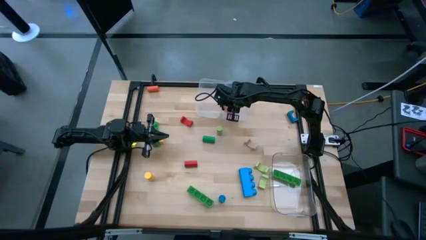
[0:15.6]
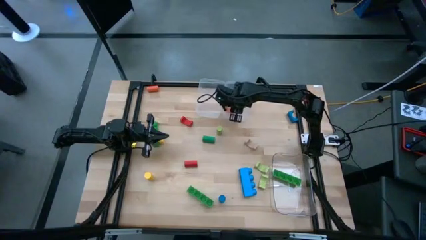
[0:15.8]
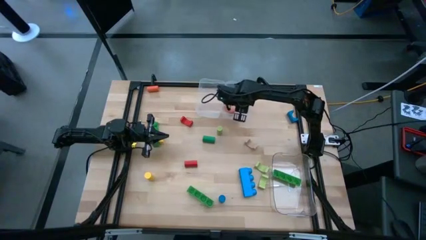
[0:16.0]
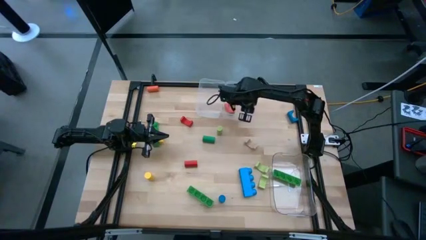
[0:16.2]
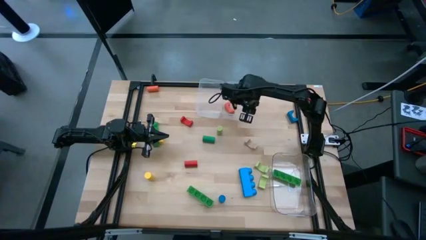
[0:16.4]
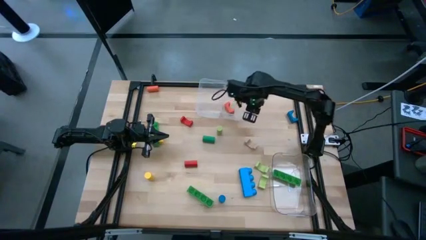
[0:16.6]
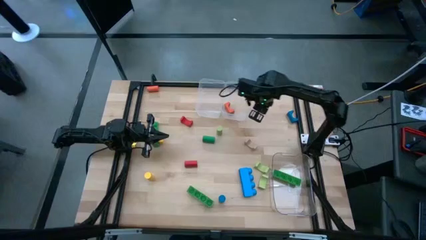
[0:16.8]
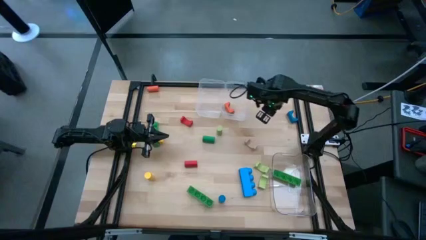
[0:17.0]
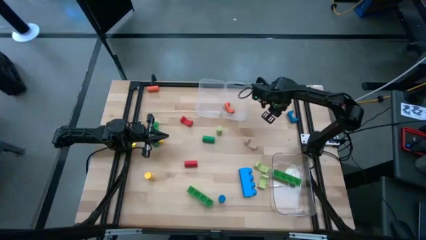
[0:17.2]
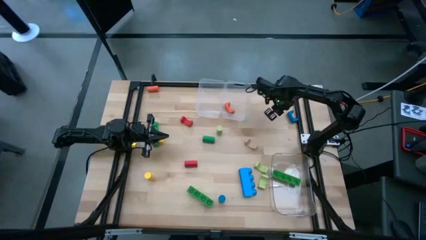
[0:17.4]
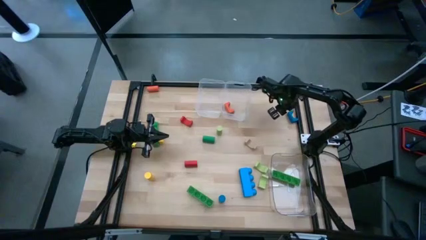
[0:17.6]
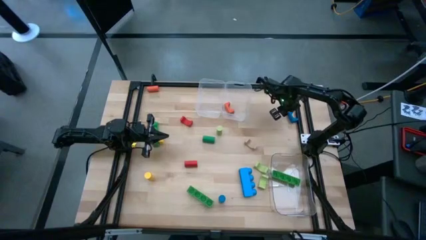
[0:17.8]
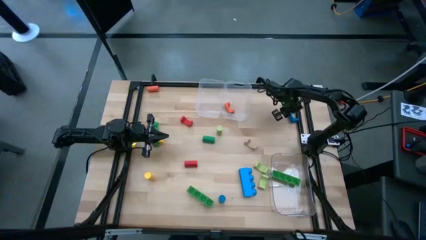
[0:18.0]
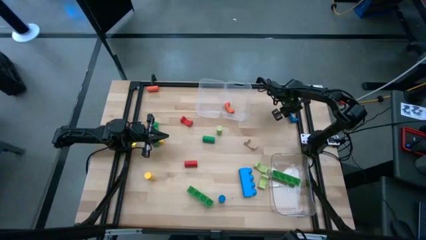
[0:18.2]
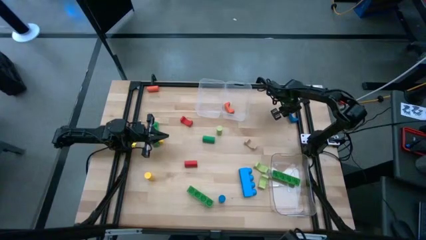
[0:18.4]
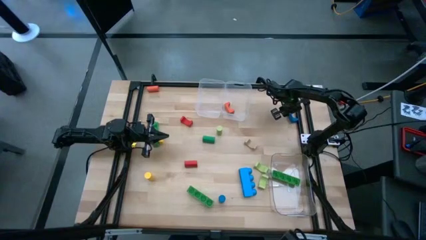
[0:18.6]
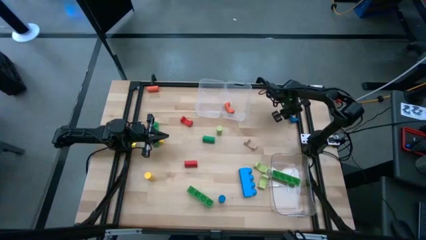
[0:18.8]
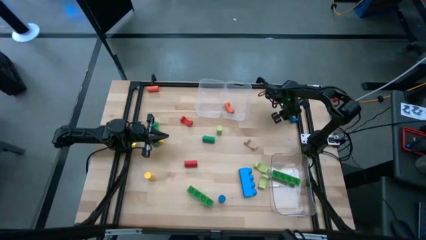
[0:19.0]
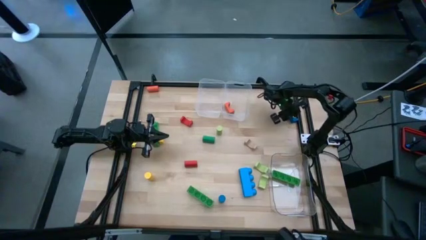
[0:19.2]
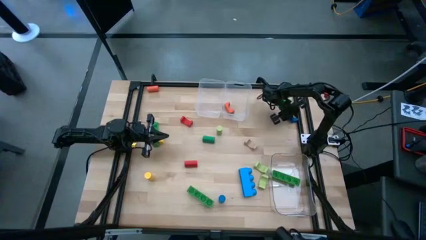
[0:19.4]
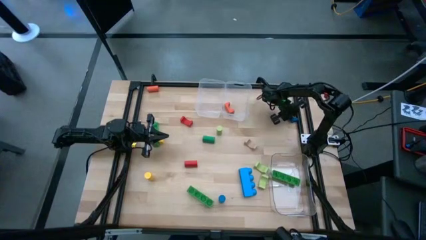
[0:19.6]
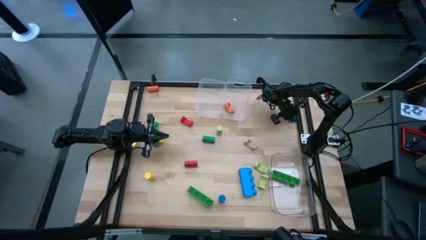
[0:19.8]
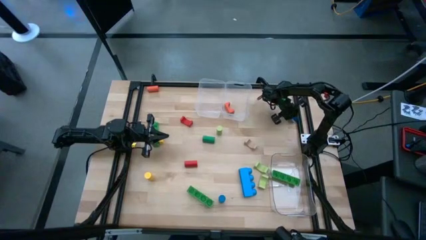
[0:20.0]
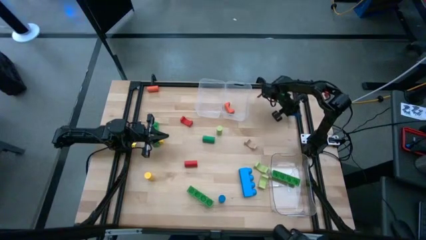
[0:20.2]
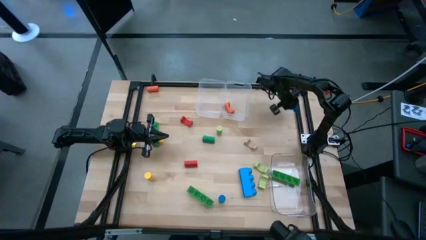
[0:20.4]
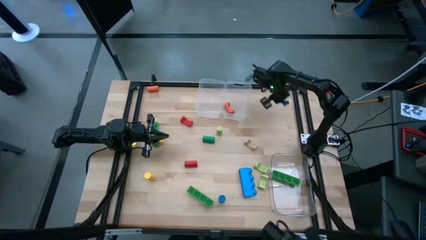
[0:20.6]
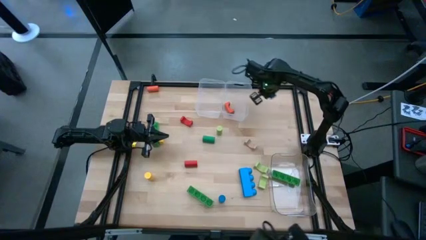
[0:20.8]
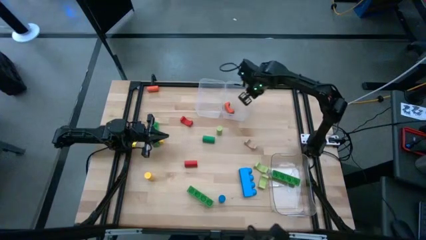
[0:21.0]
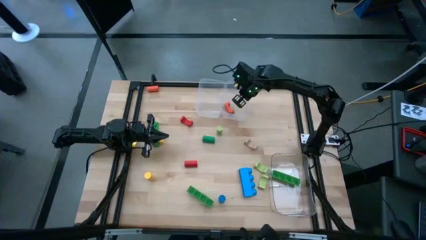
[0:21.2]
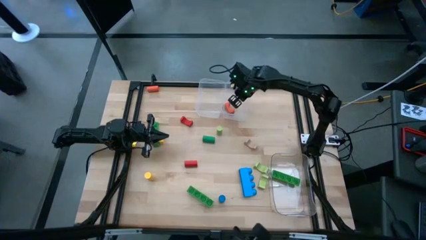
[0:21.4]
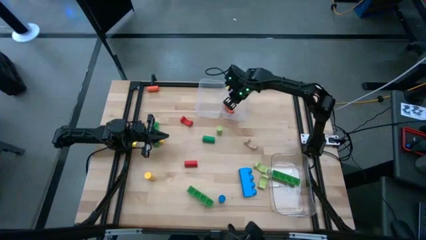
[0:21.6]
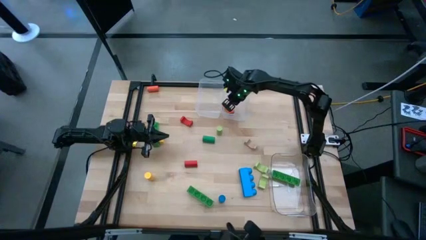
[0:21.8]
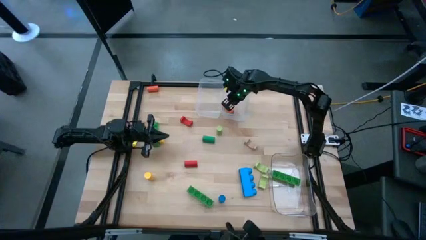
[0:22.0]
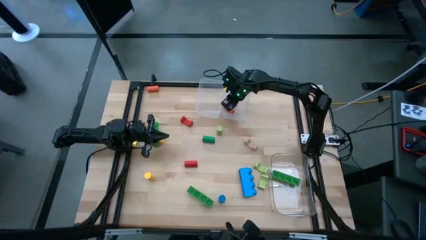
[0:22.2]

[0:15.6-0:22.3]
Task: Sort blocks by size
Put the blue arch block into the right transparent bin

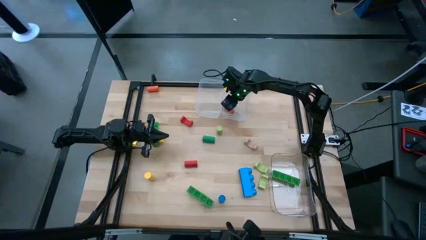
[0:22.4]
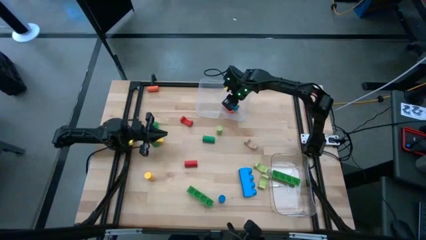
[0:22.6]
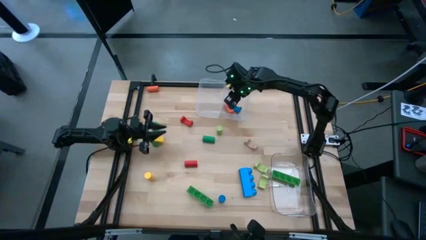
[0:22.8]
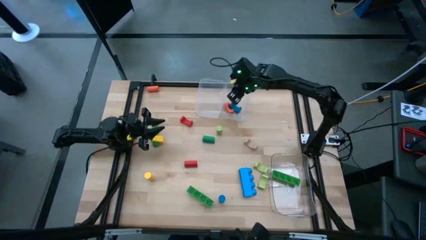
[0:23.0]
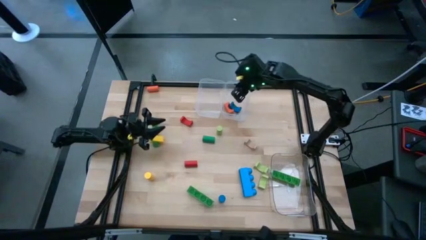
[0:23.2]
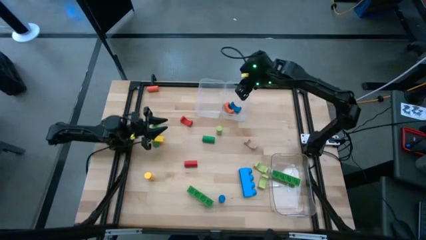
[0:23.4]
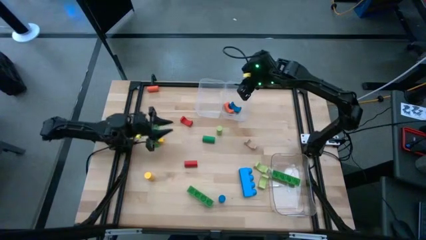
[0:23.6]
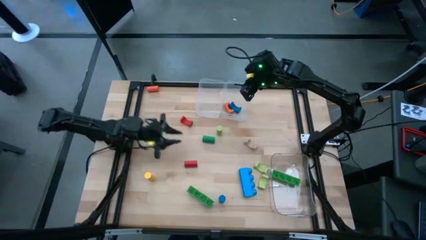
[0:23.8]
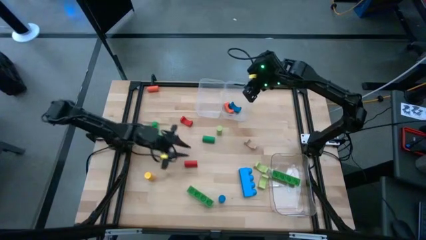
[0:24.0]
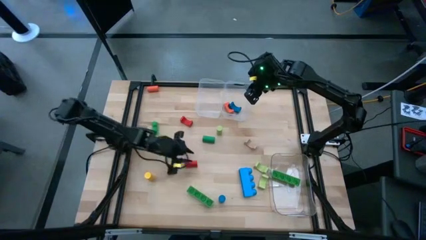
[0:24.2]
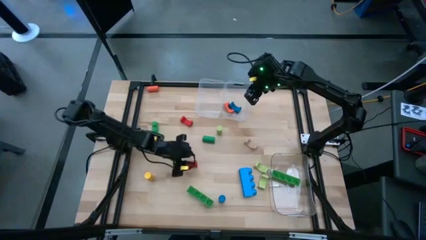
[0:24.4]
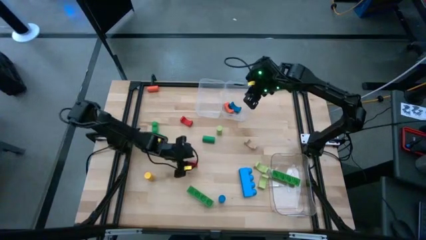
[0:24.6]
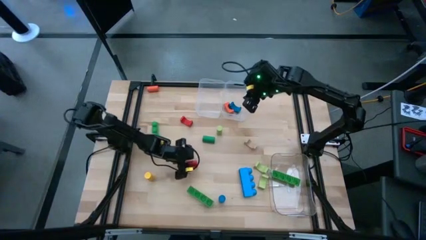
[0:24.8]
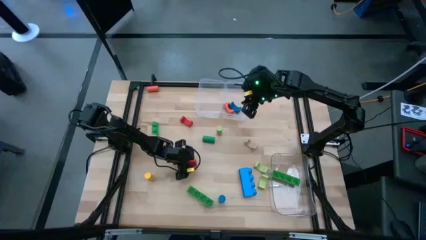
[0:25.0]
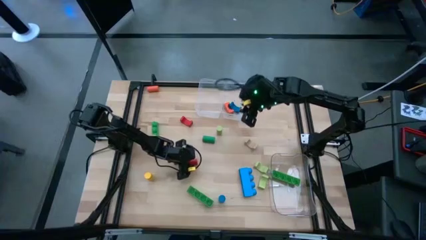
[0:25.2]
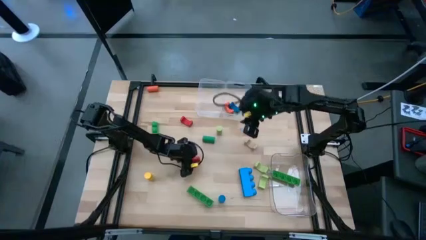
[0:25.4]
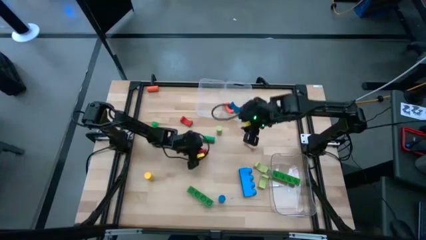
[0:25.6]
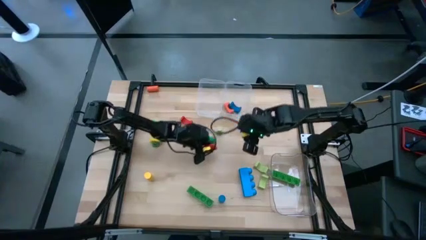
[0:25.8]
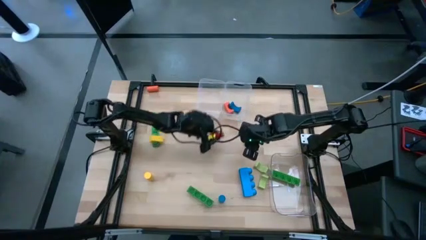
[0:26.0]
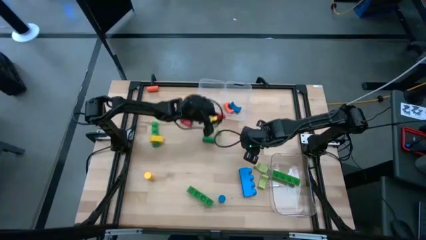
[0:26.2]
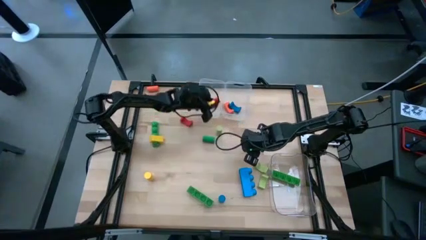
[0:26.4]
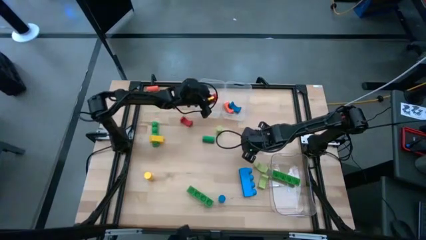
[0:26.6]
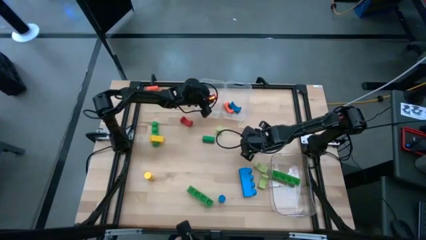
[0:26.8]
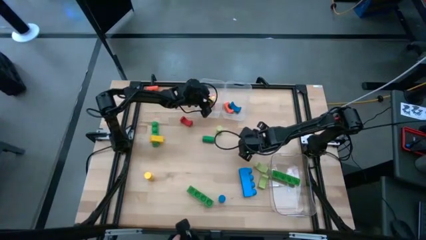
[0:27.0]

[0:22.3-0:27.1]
Put the red cylindrical block into the left transparent bin

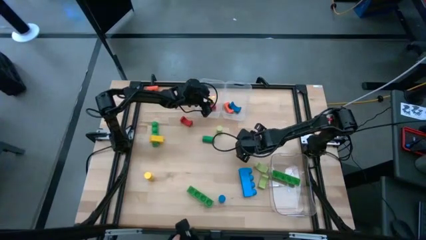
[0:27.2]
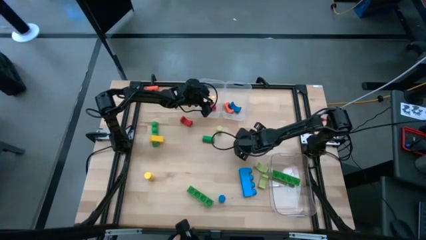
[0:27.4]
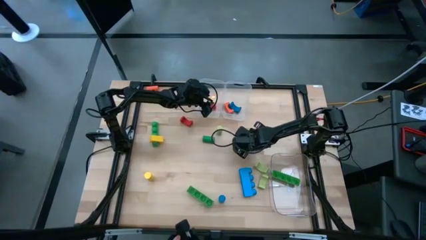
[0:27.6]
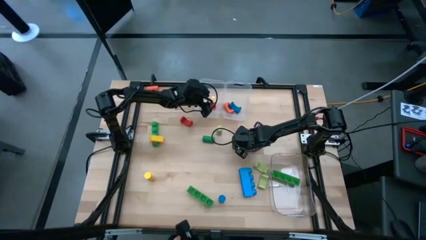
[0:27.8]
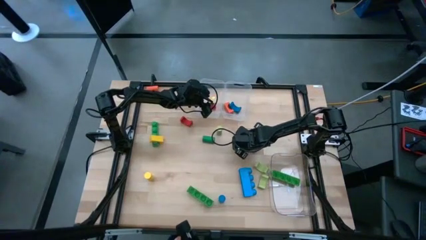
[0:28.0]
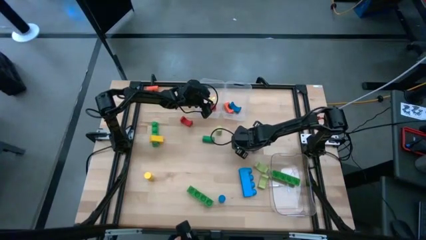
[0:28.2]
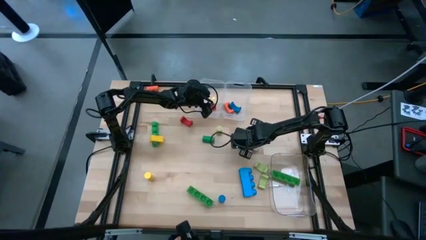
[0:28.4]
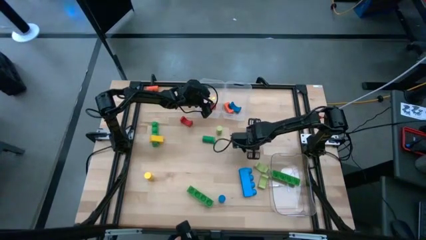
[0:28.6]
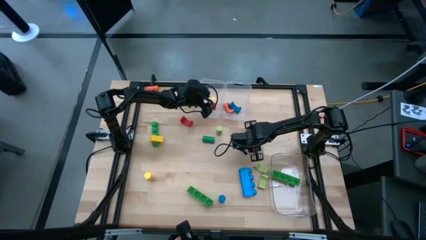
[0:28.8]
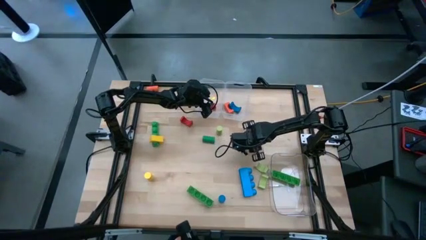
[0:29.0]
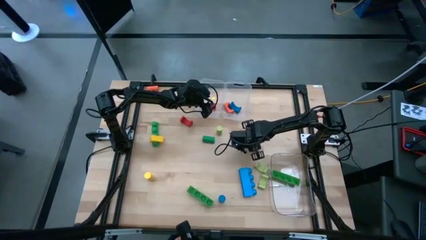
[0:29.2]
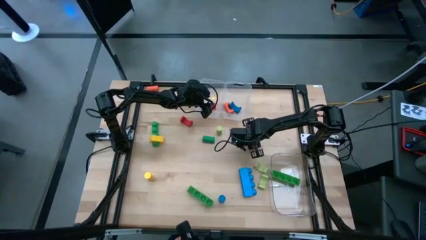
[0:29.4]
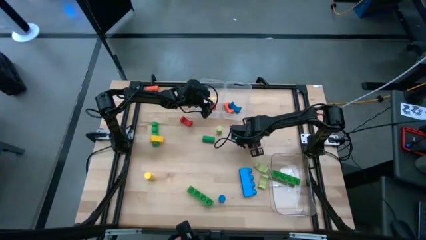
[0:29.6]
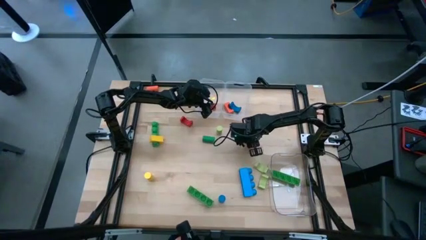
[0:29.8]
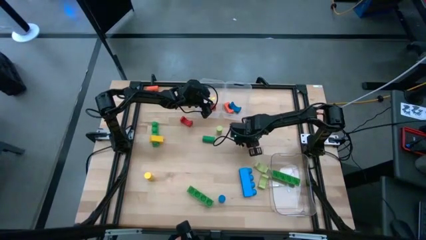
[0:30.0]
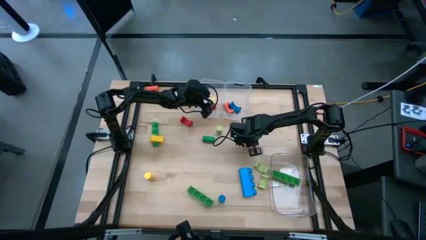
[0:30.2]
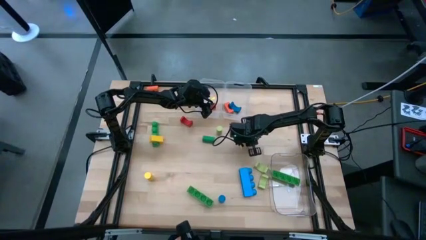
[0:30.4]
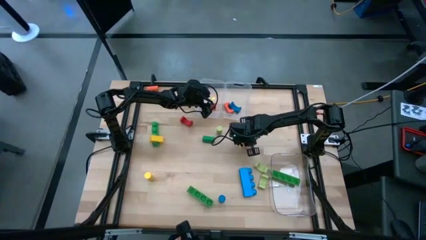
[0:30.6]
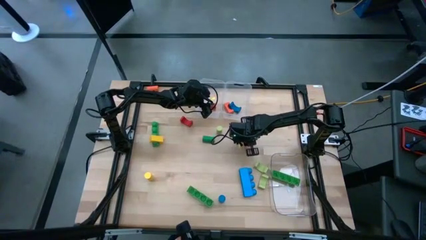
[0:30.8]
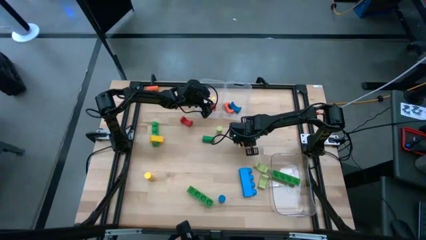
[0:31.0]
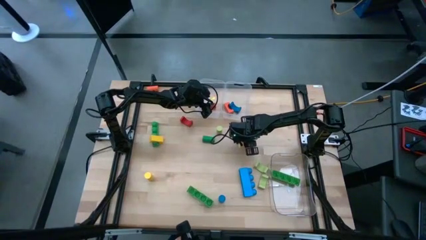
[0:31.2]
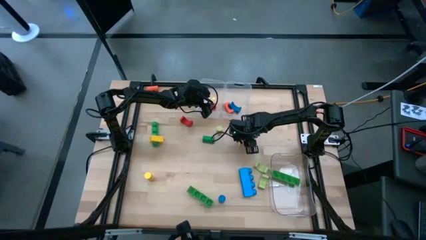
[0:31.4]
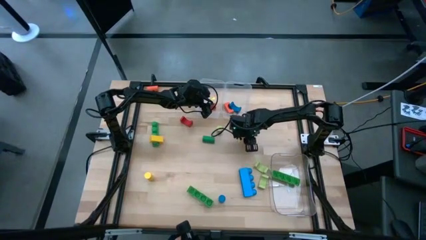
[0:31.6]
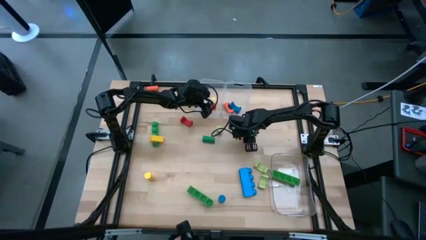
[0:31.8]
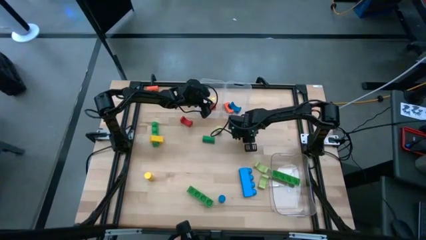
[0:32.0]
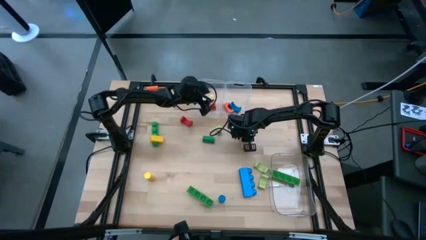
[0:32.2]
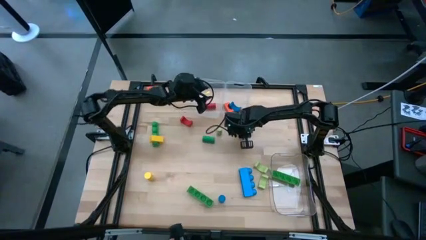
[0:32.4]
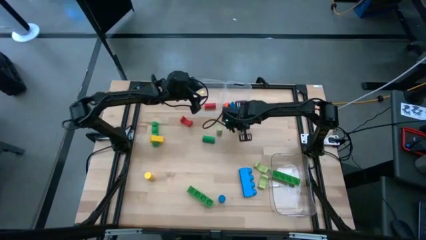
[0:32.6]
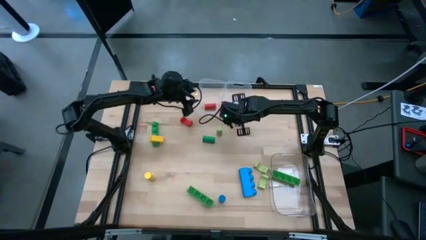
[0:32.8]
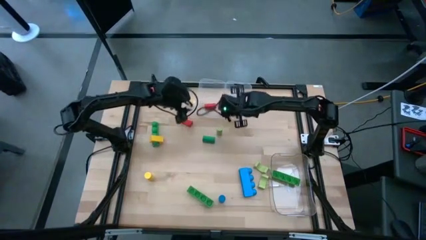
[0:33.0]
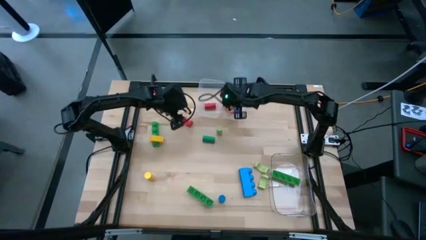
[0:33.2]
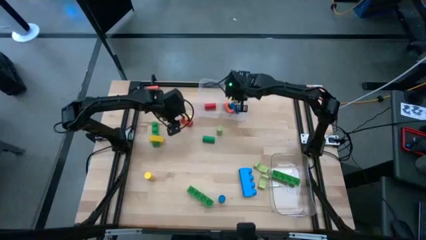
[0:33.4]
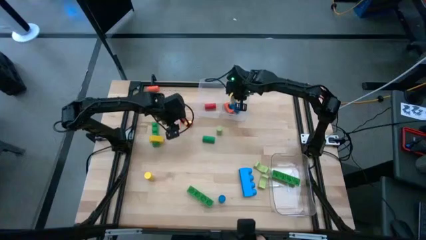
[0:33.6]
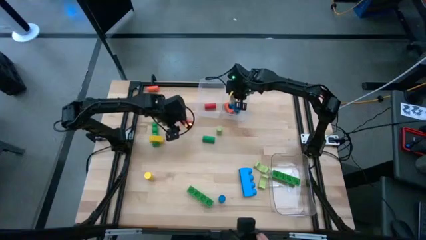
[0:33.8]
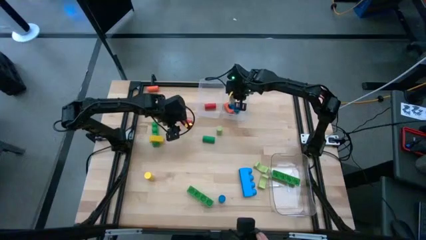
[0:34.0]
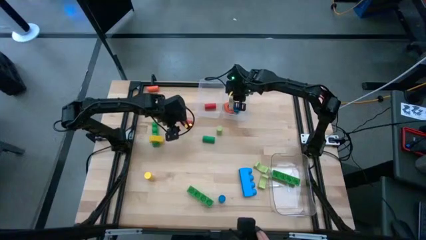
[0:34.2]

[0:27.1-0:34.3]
Put the brown arch block into the right transparent bin
